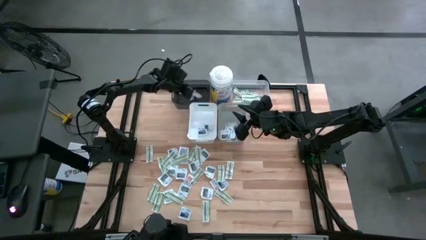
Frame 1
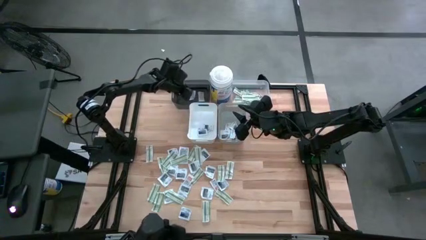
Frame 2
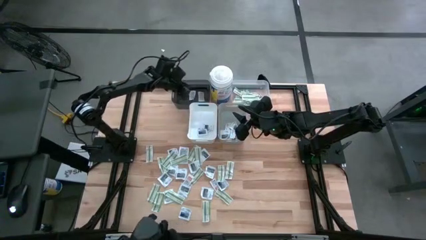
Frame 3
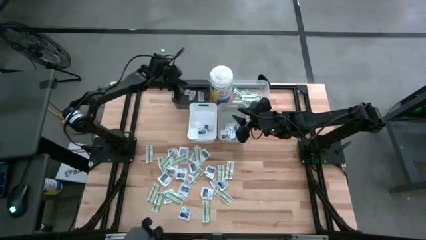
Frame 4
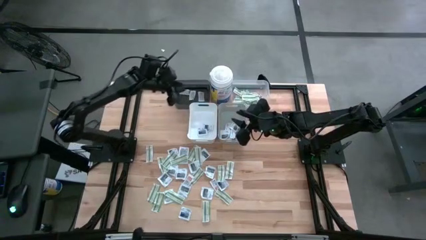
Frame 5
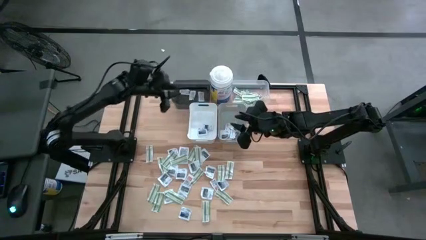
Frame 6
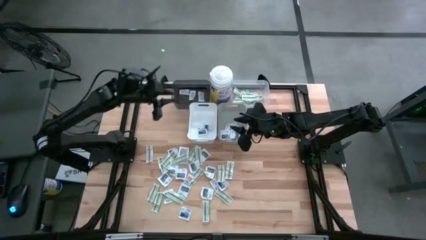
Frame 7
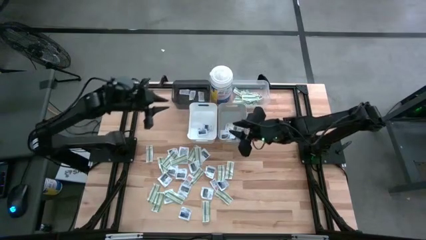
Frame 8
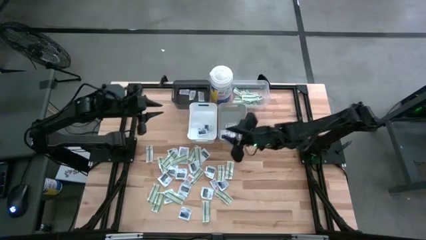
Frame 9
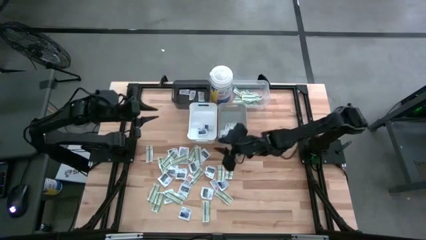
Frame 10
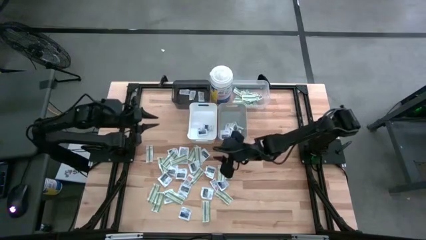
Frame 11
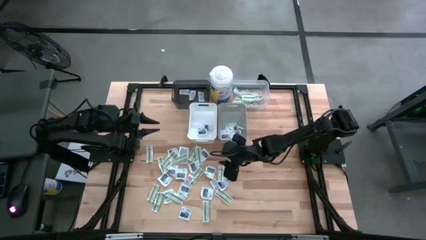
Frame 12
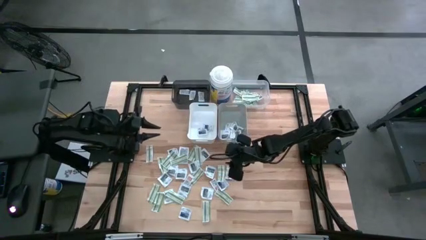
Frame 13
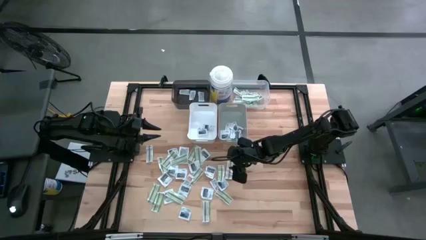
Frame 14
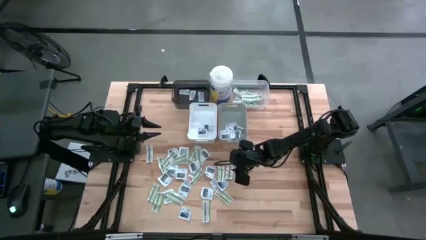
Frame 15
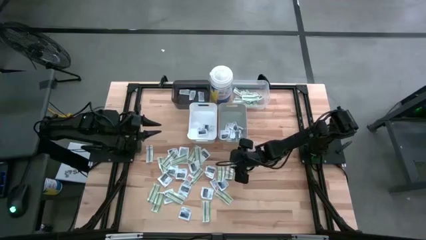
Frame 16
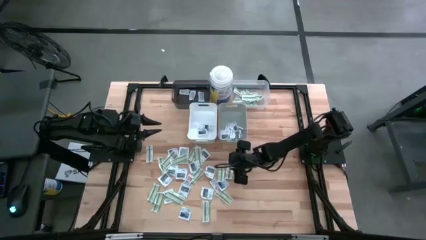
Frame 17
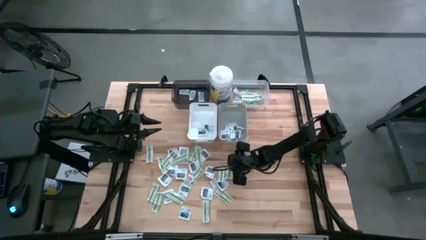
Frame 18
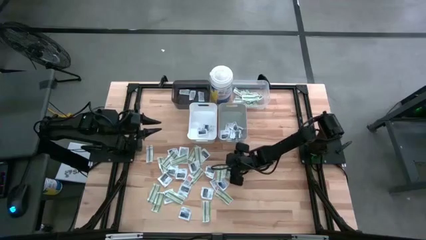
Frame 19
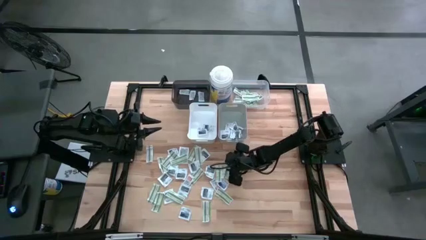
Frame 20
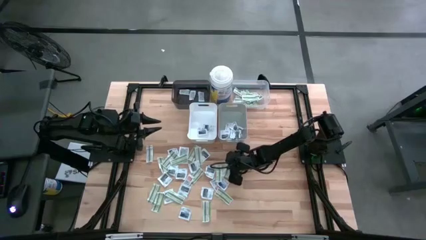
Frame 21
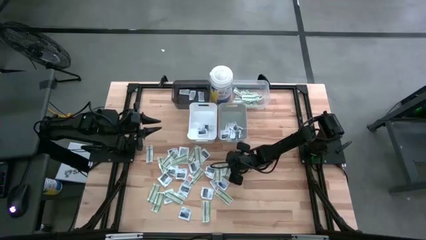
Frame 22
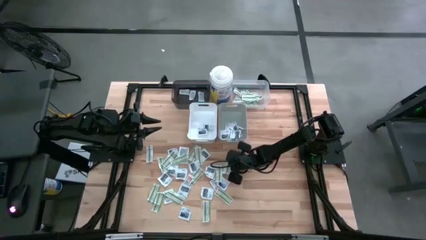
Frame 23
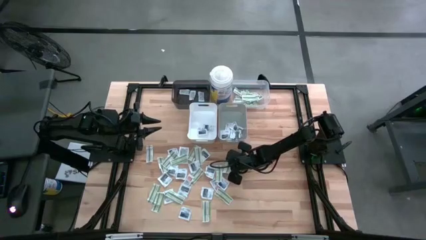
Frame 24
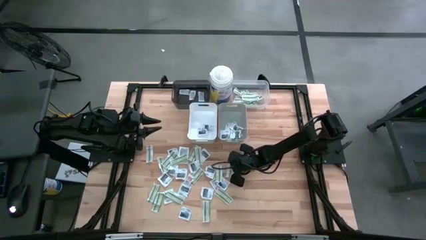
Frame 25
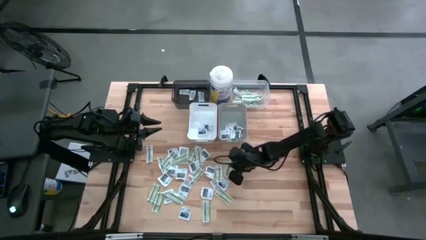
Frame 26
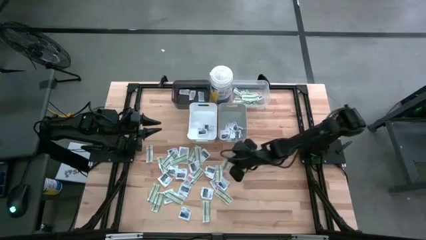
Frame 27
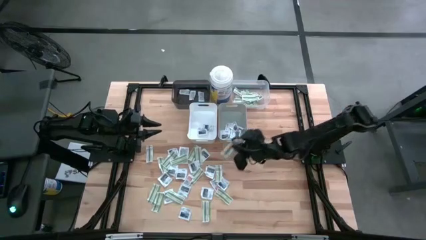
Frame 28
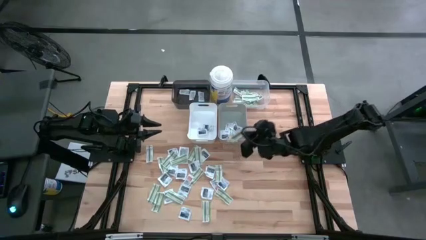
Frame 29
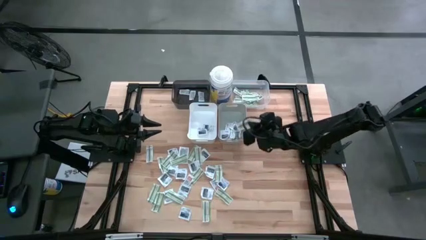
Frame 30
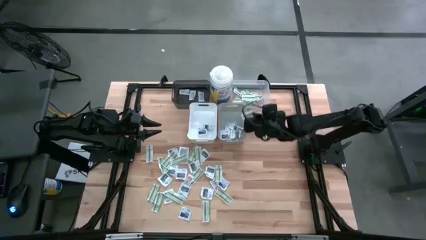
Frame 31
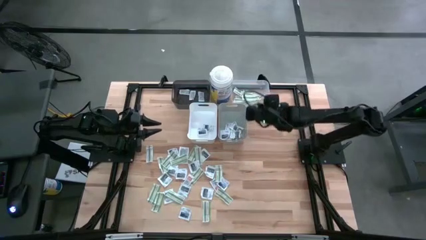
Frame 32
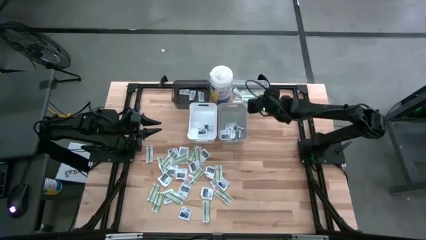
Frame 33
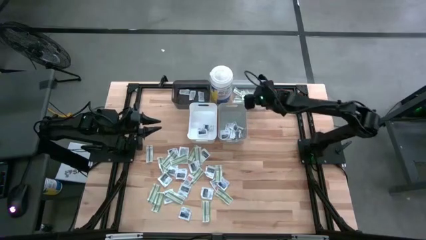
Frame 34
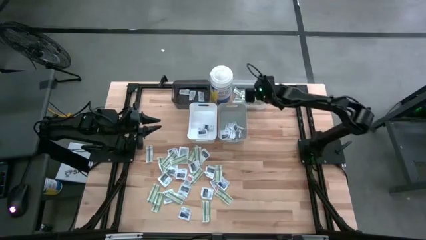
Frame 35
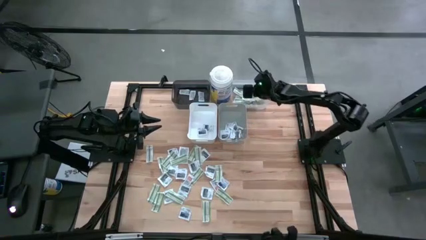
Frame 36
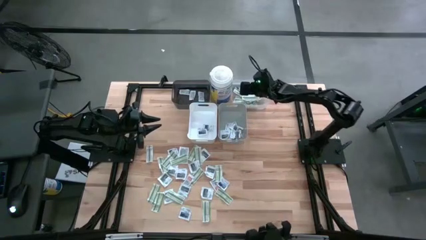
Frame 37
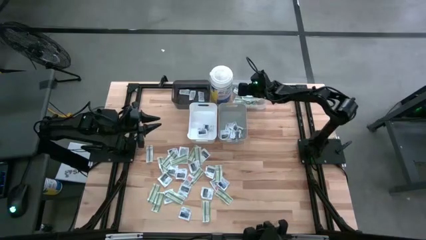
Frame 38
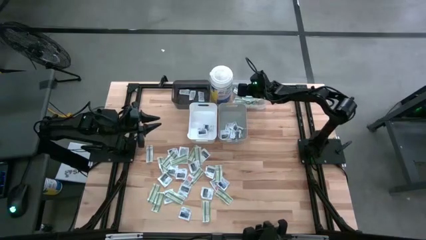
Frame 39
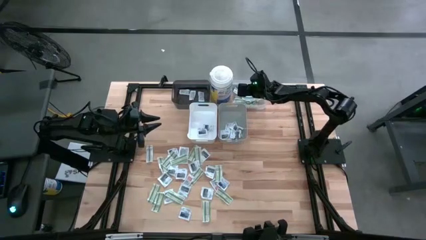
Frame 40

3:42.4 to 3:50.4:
Task: Pick & Place First Aid Supplies
Put the band aid into the transparent bin

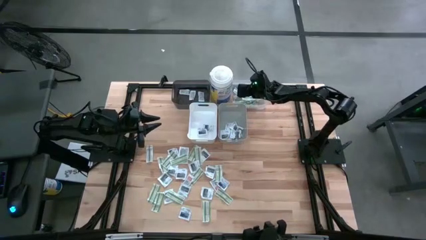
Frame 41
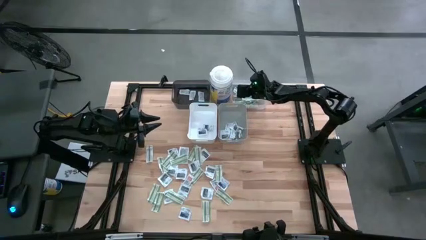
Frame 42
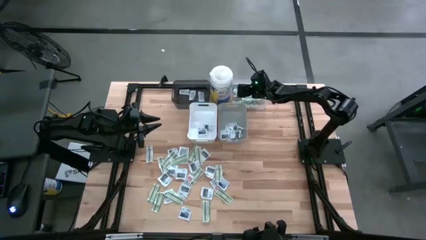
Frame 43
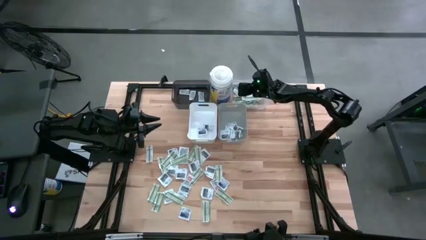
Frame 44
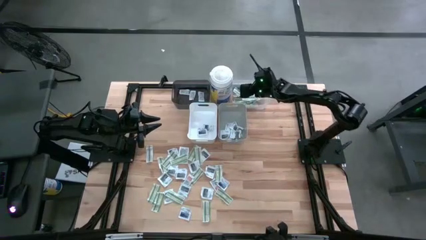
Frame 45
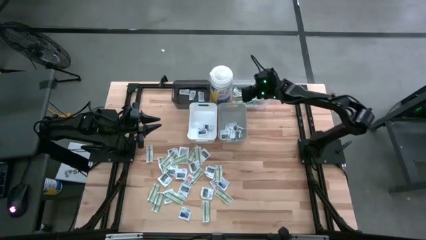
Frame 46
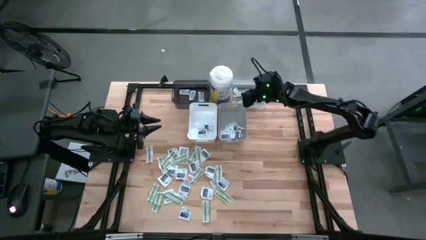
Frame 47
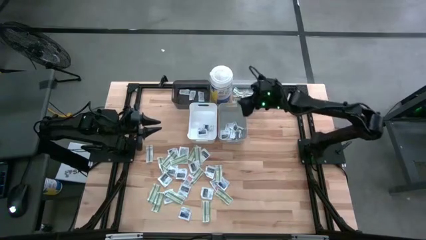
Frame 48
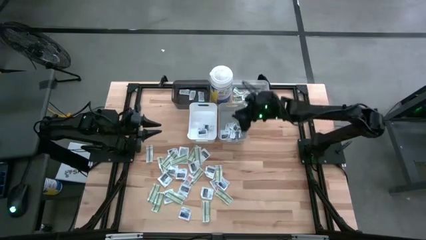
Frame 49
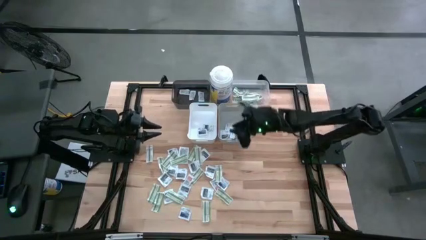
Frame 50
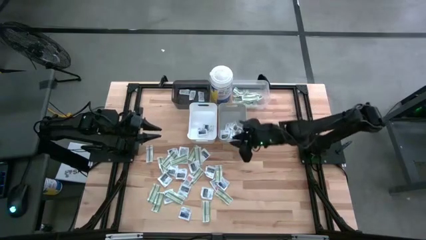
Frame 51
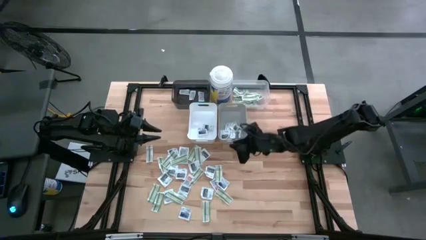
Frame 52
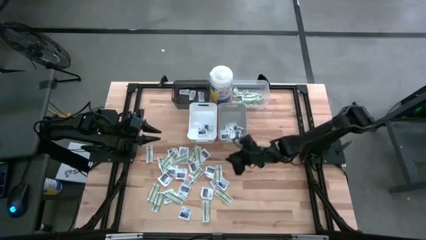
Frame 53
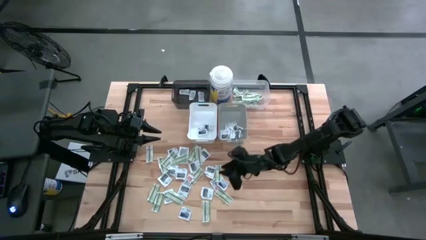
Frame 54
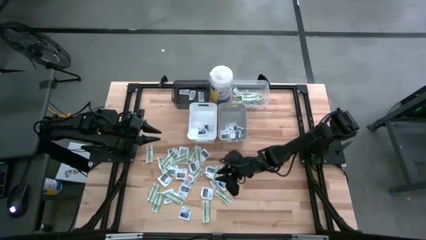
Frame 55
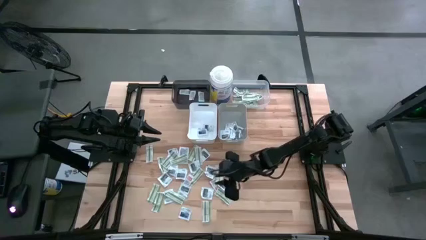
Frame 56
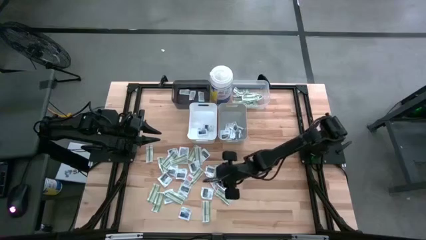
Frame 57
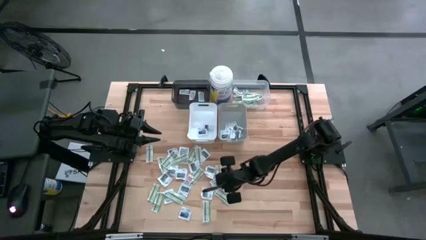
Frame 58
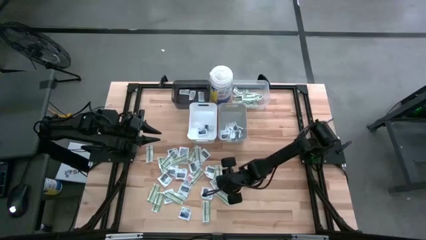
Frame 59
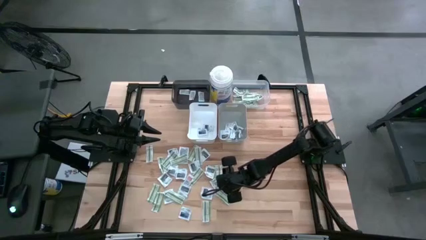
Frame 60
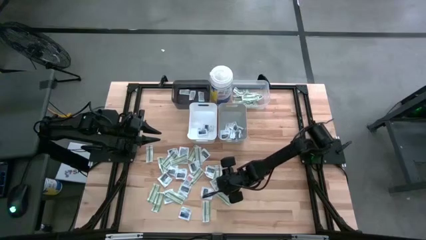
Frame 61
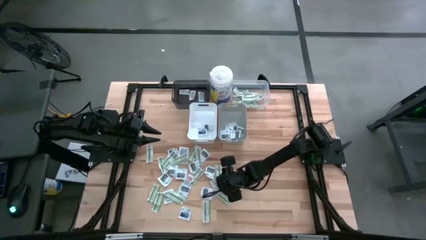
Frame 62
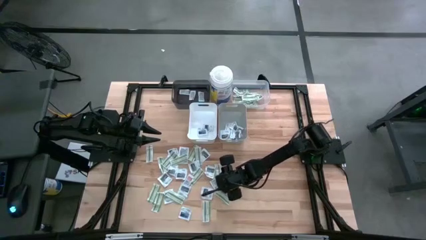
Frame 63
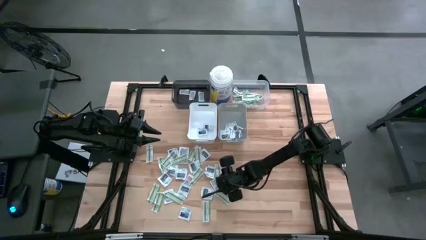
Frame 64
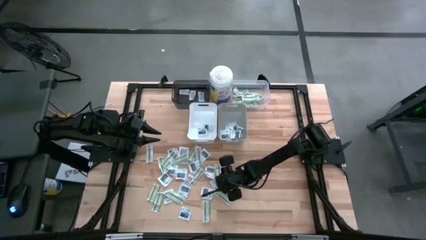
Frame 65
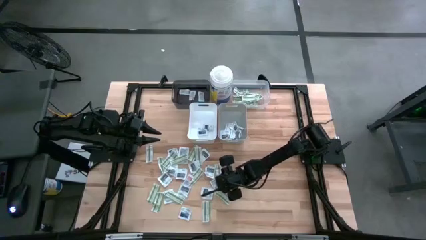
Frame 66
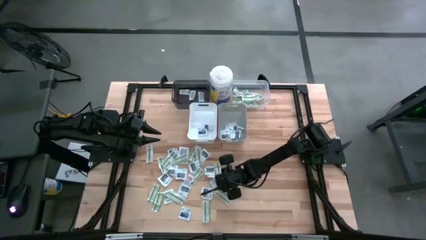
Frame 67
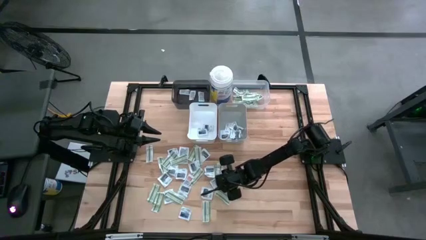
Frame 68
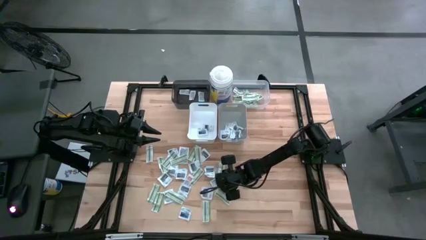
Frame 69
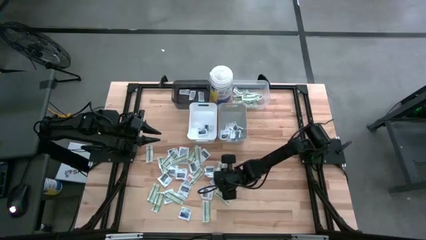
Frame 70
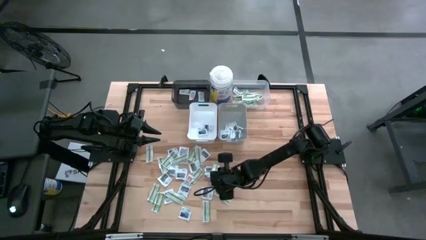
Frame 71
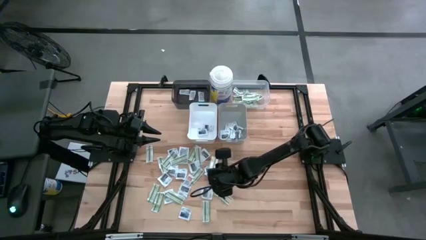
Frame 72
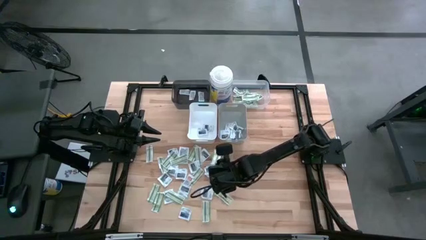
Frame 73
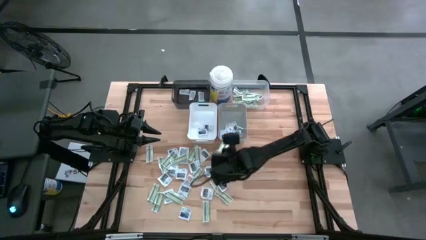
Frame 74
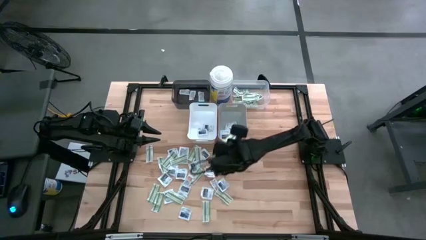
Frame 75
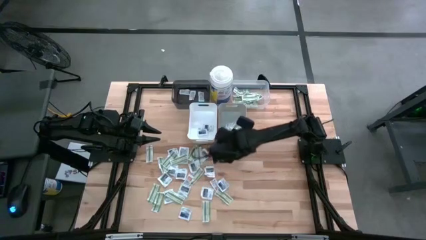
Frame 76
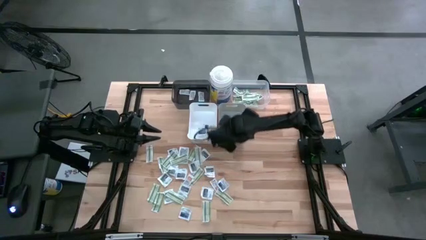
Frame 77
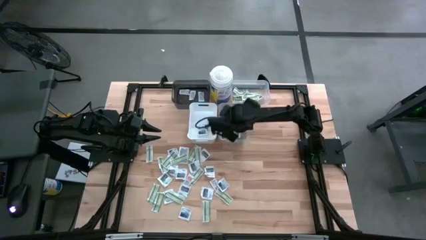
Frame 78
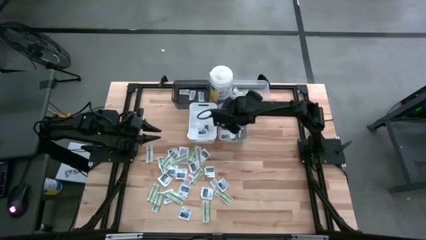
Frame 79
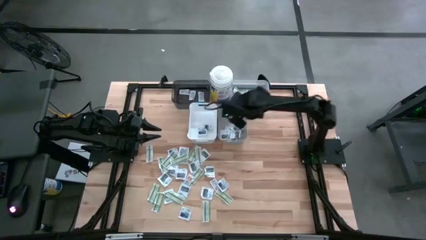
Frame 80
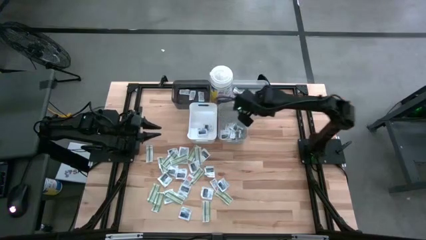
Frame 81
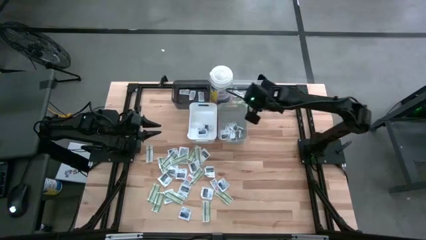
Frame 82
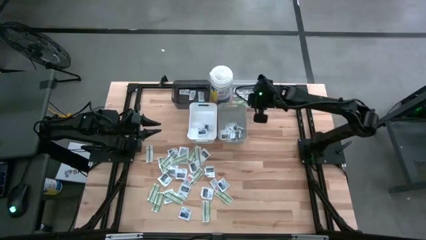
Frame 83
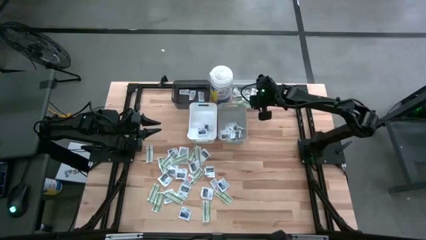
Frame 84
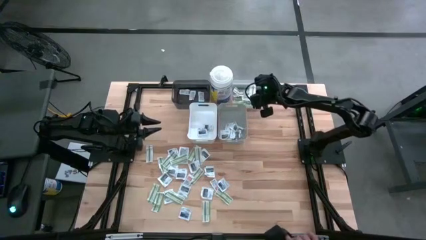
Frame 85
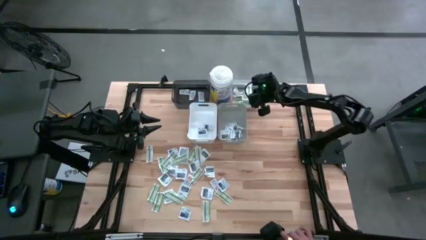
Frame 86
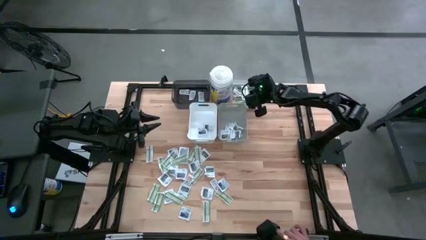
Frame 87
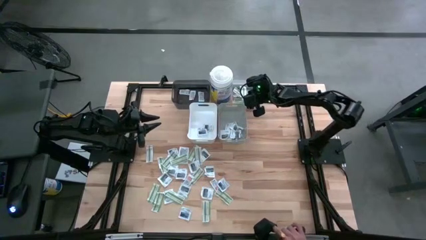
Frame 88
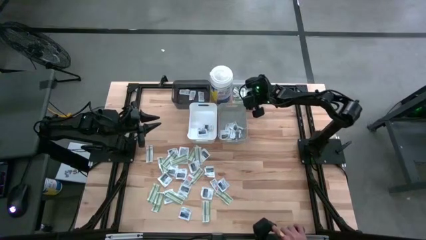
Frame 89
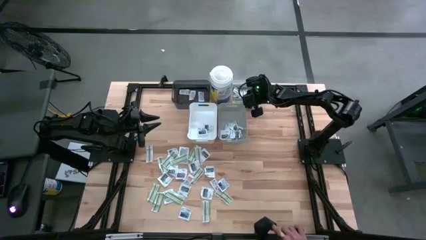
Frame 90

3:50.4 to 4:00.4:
Put the band aid into the transparent bin
